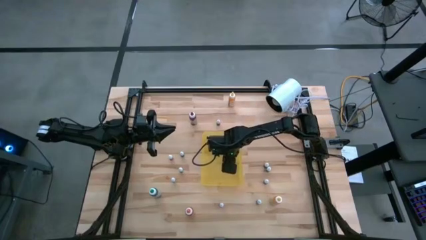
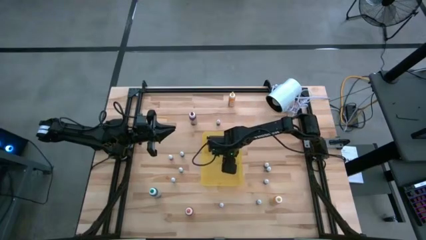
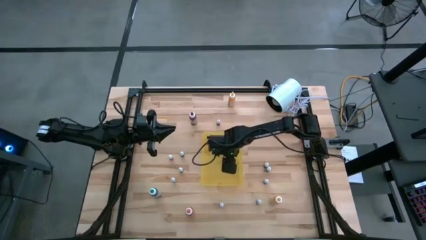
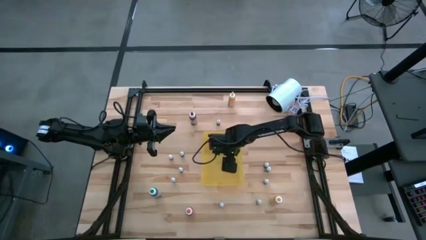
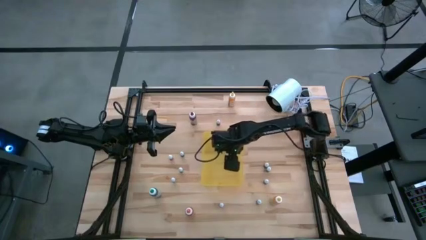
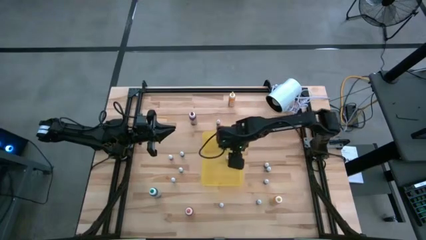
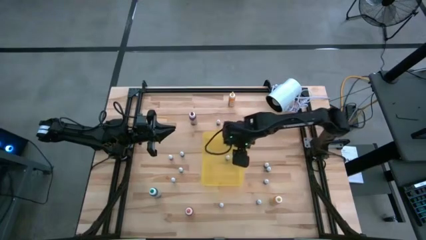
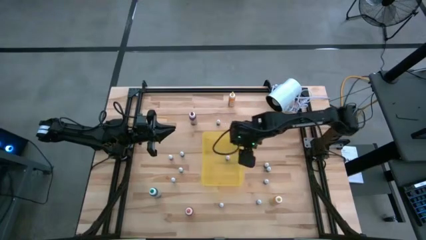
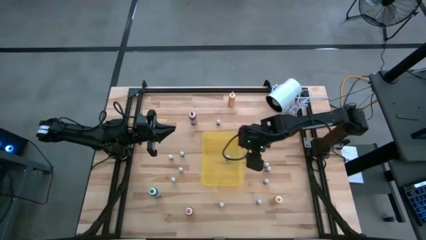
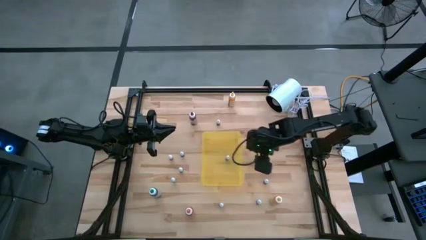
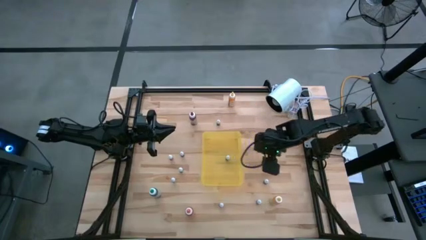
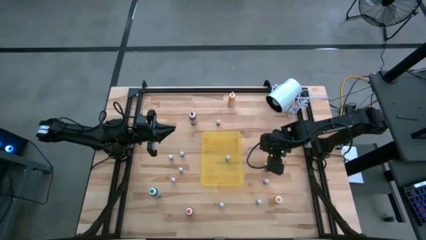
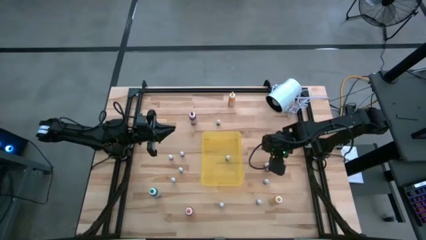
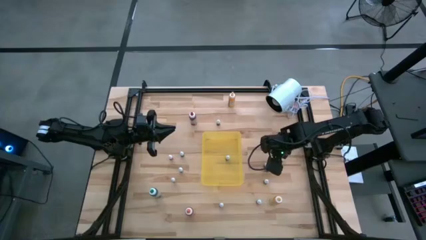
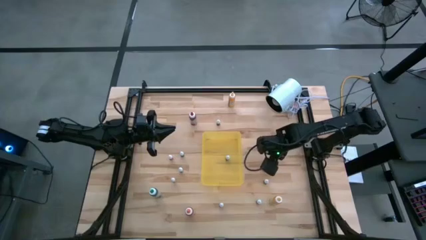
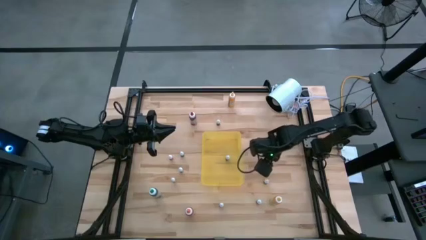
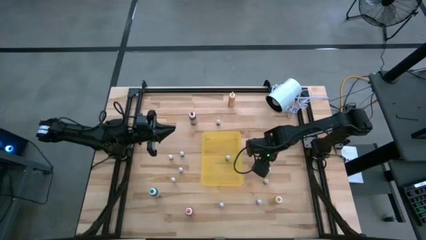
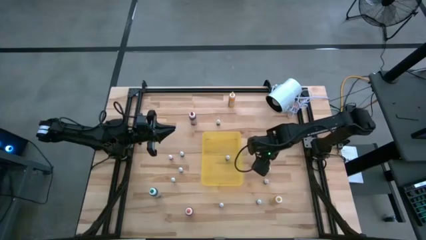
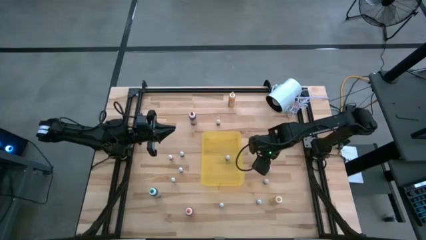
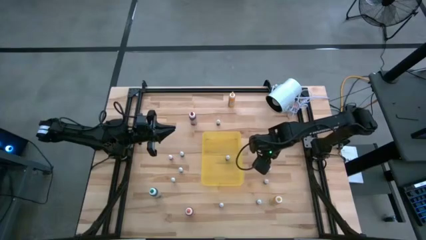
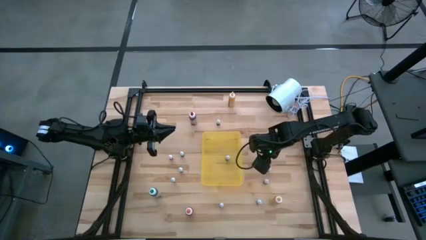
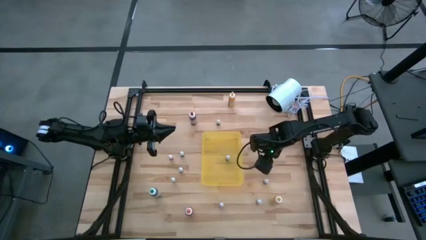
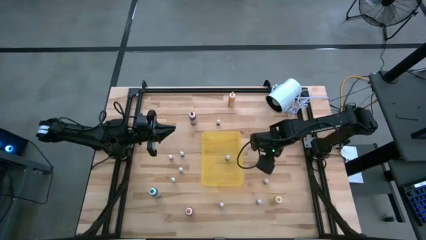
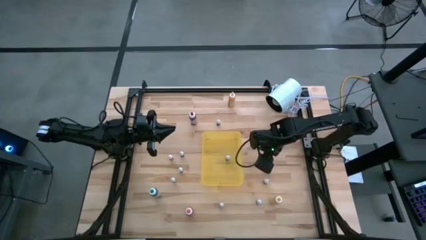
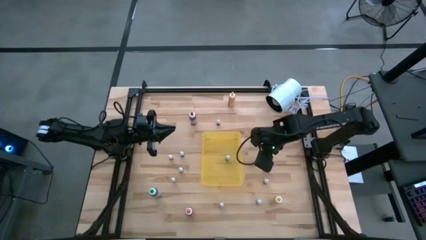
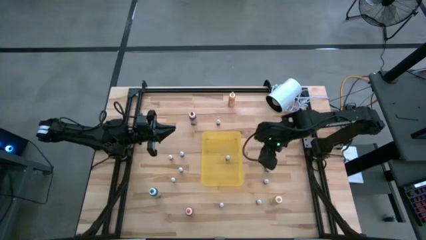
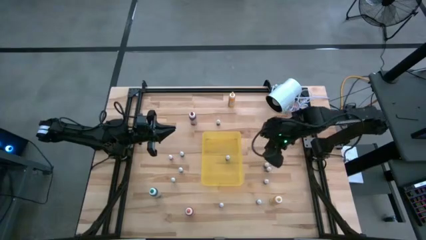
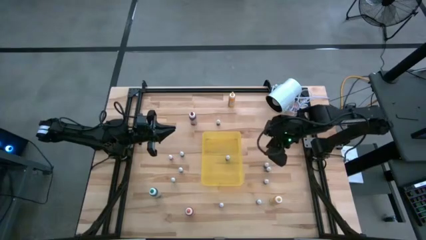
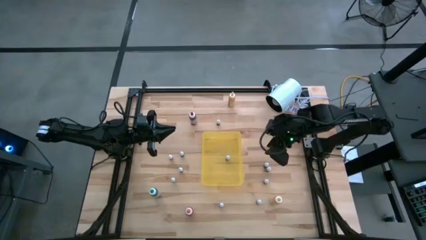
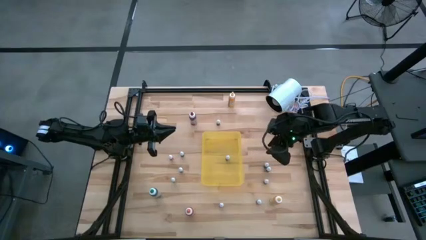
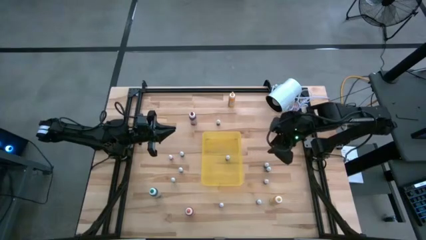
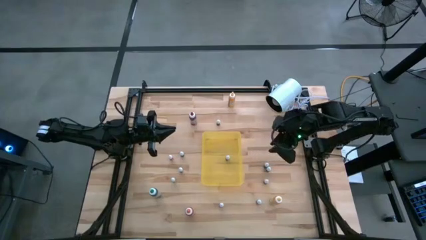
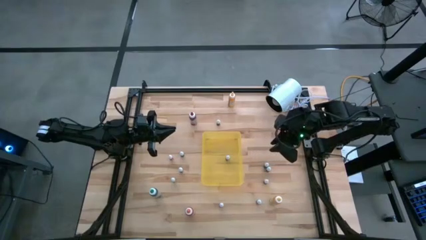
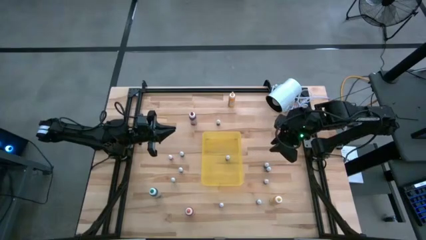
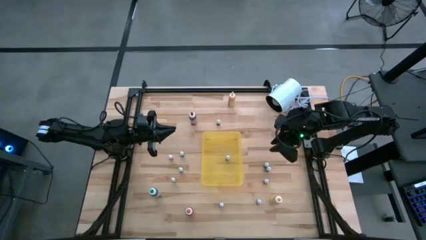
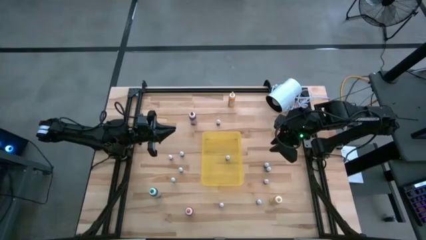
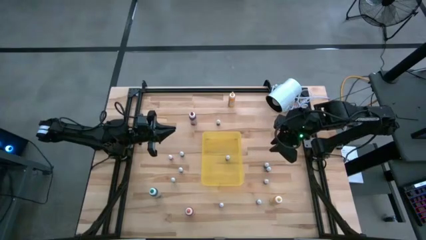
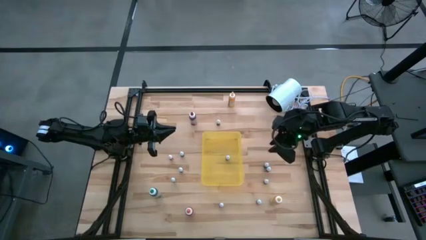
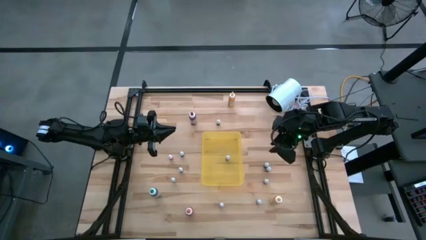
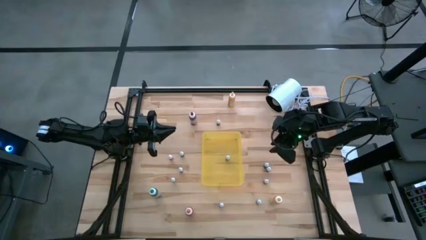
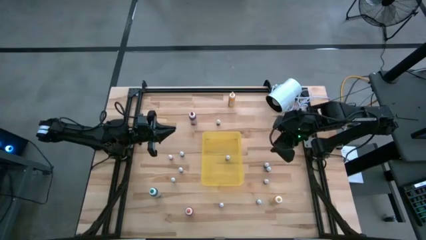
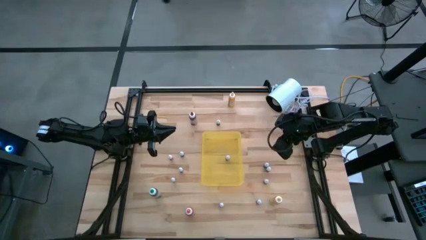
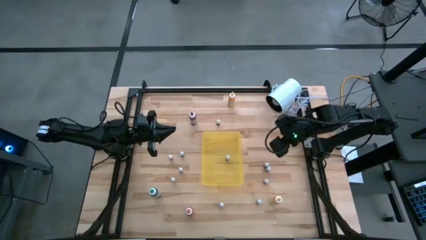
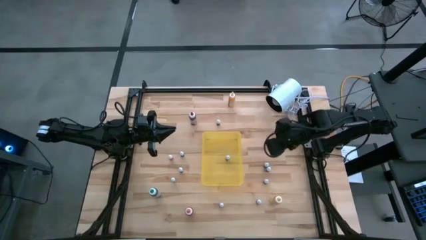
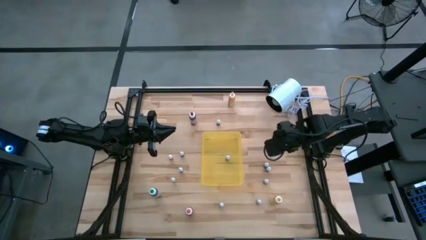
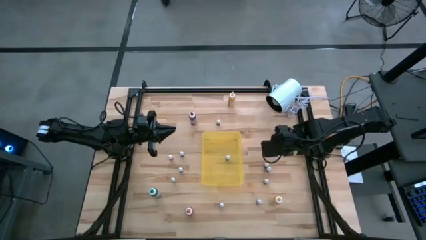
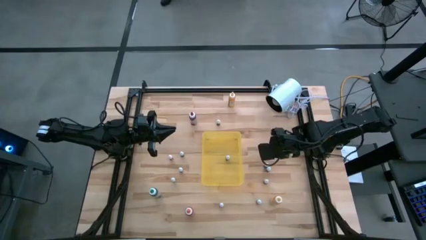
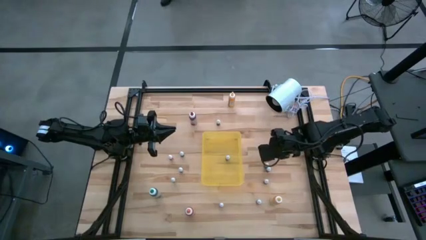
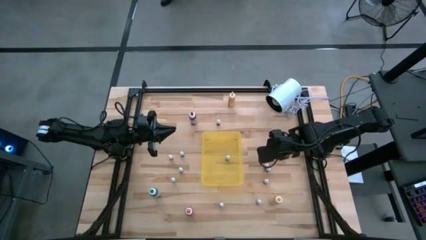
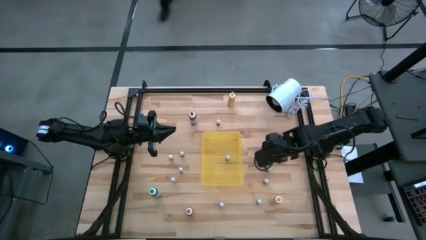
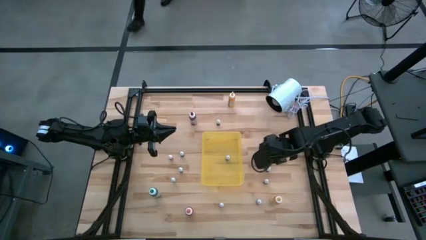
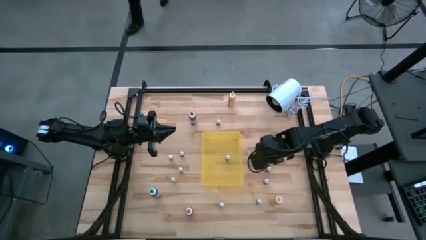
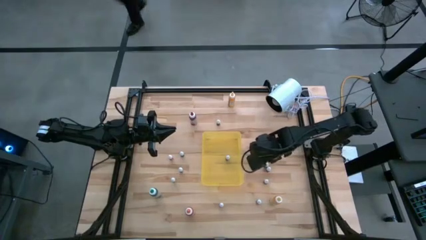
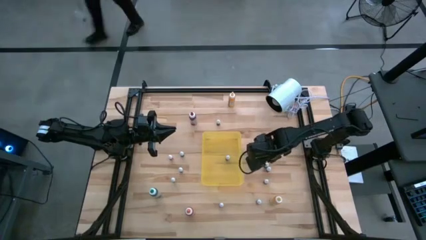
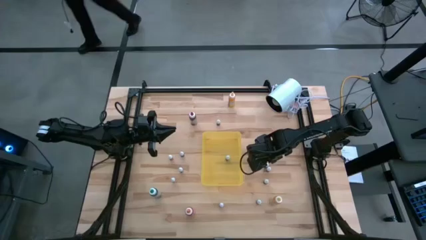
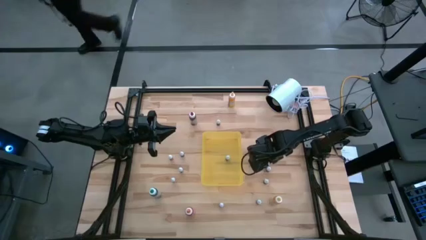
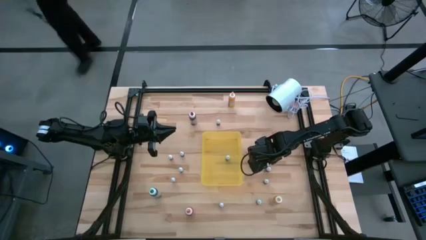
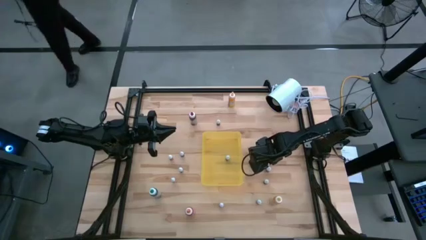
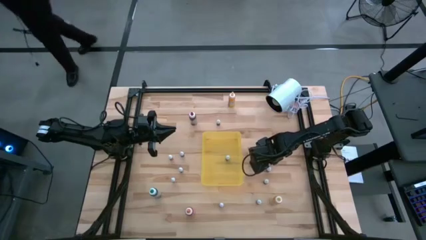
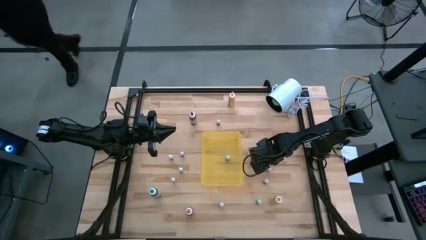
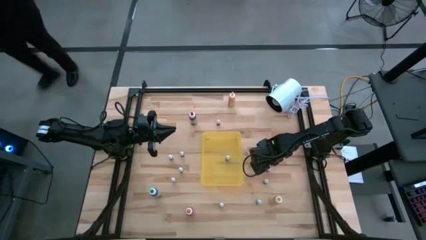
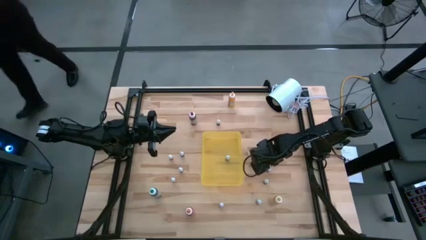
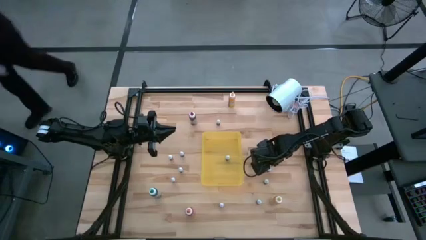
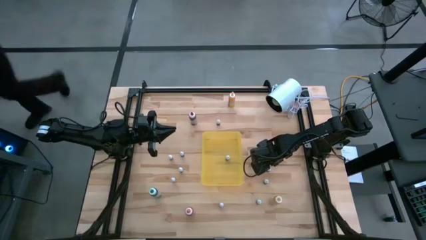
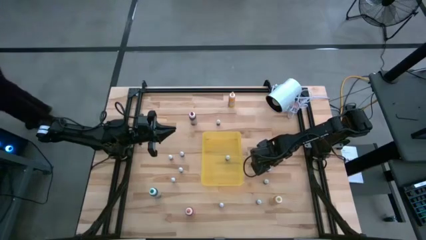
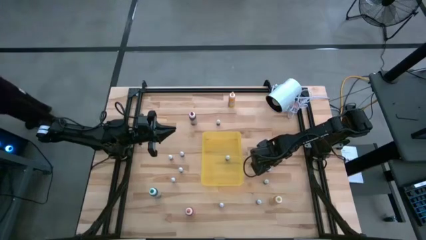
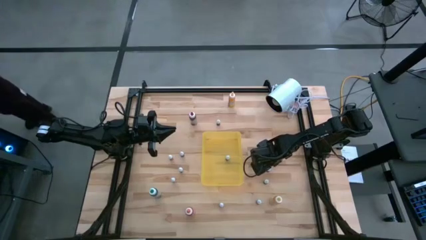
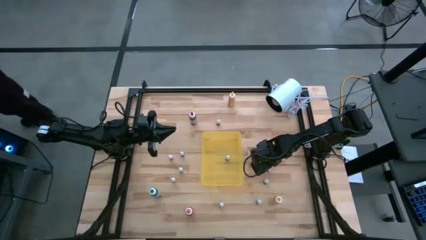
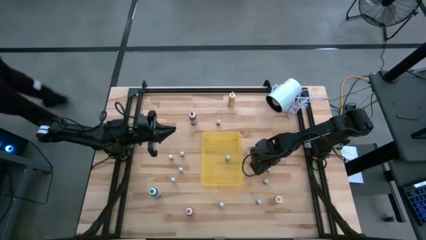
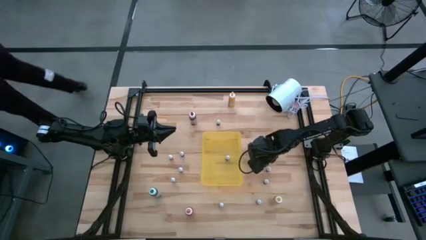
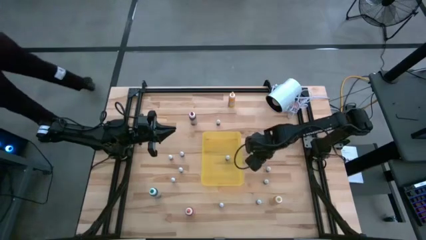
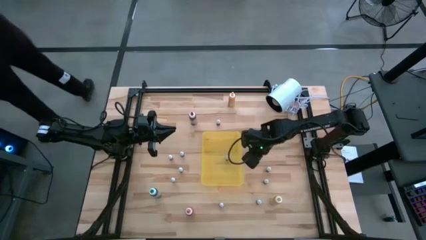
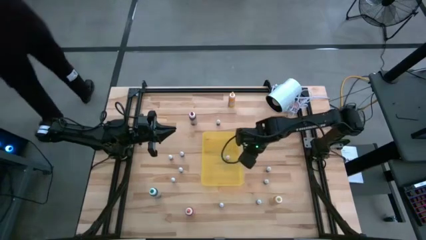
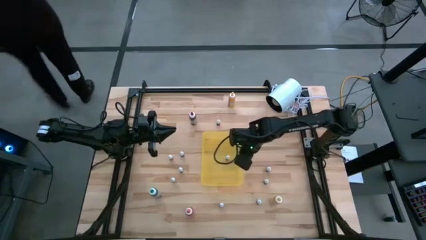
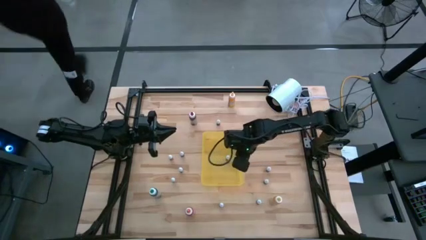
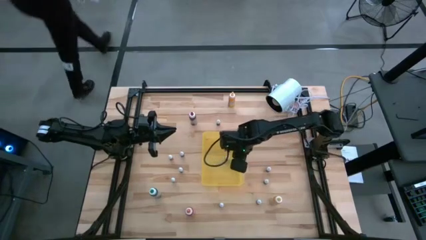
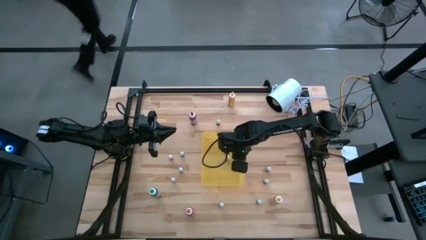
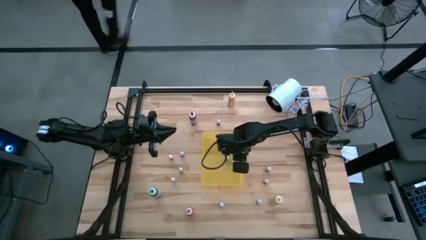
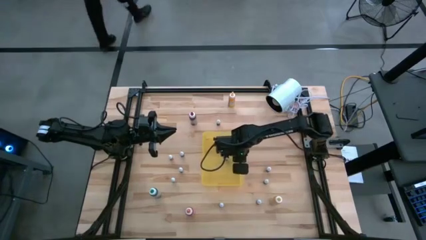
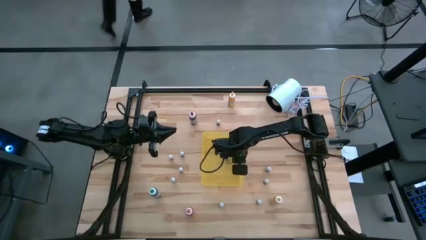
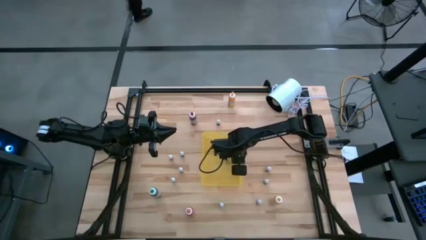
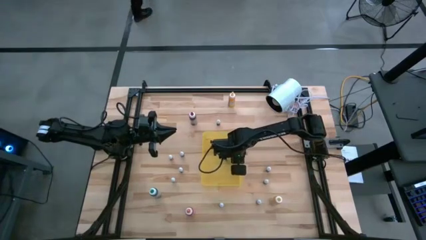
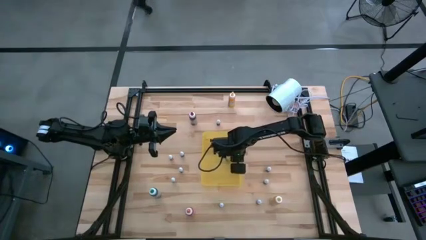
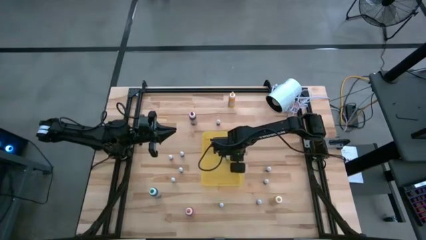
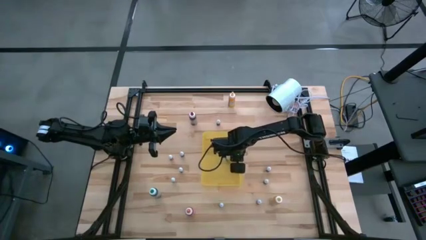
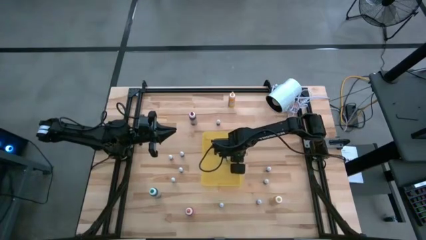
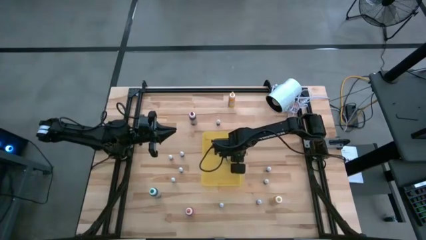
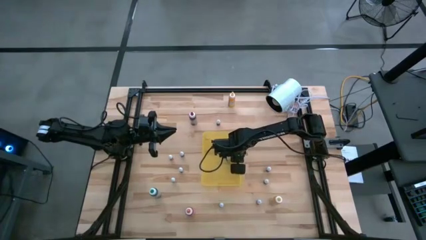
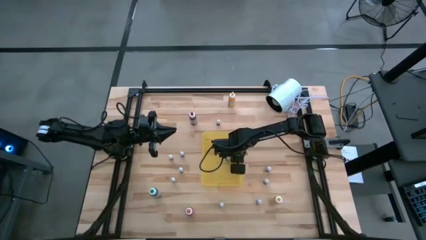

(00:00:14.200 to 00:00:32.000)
Task: Pick & Place food coloring
Put the top small green food coloring bottle into the yellow bin
